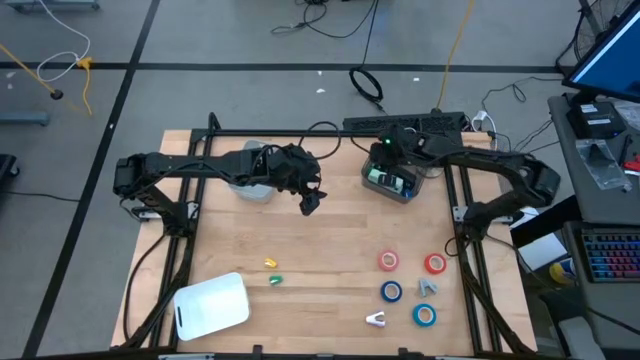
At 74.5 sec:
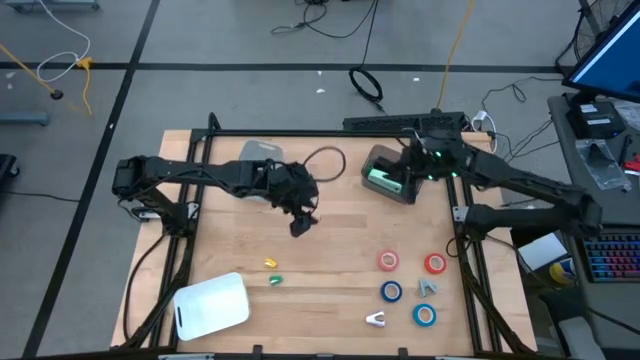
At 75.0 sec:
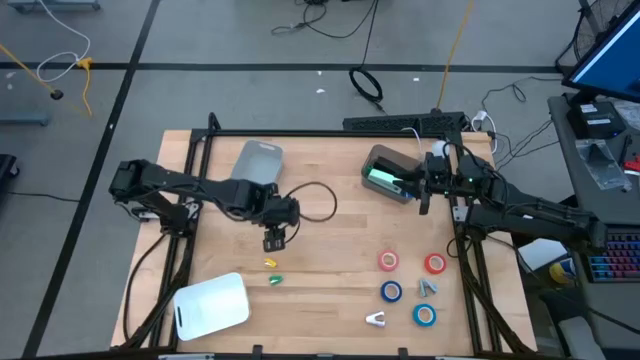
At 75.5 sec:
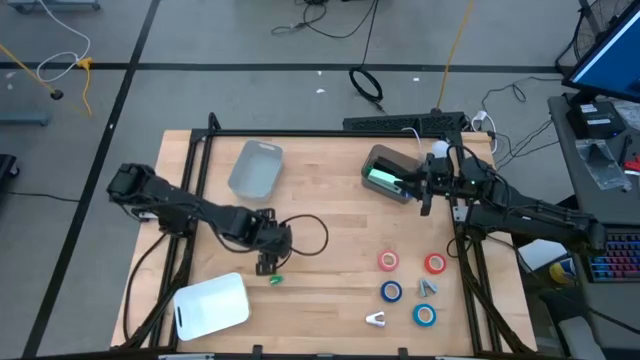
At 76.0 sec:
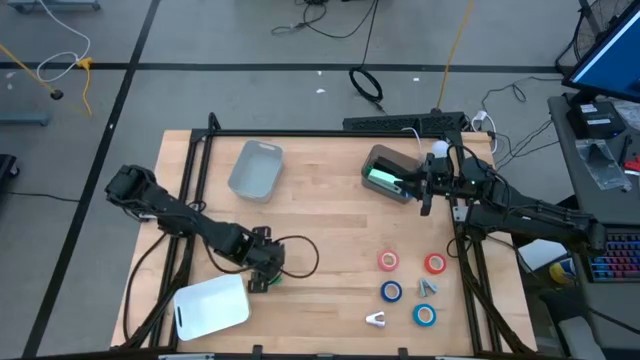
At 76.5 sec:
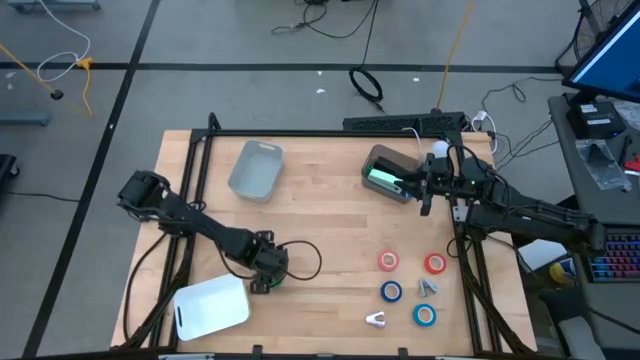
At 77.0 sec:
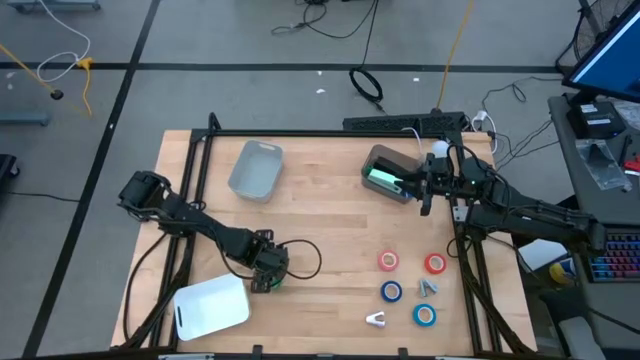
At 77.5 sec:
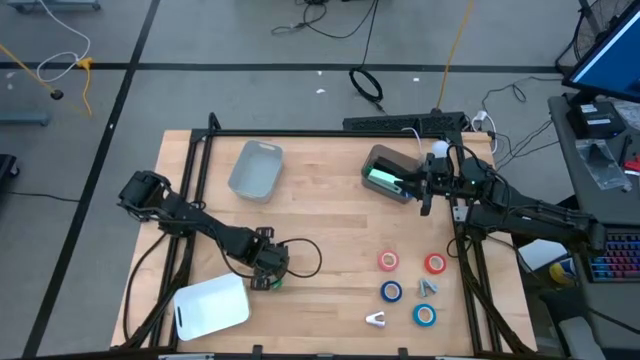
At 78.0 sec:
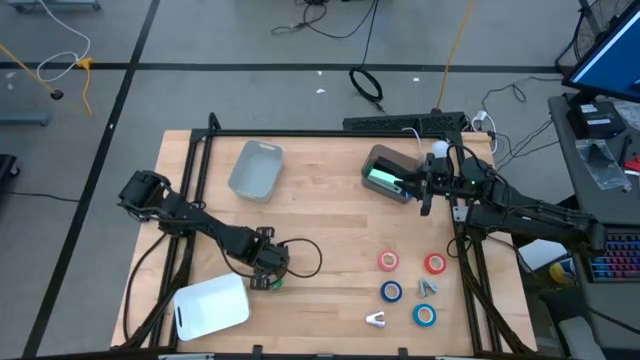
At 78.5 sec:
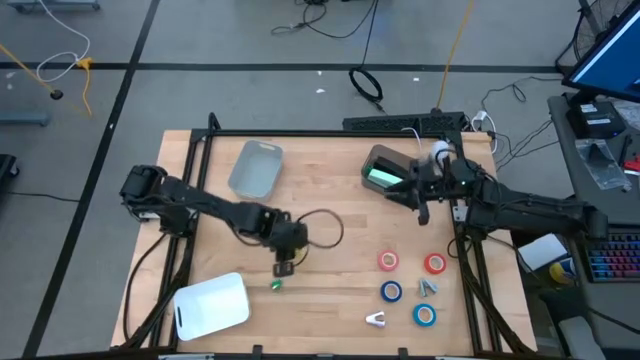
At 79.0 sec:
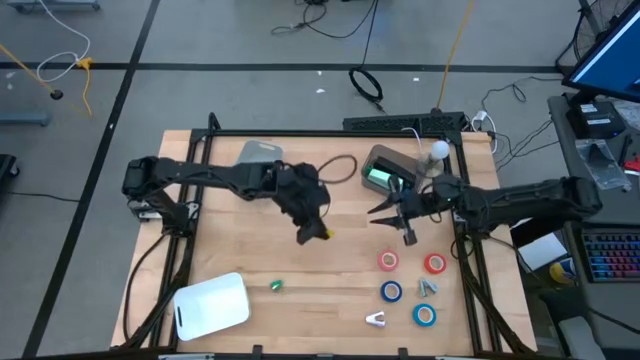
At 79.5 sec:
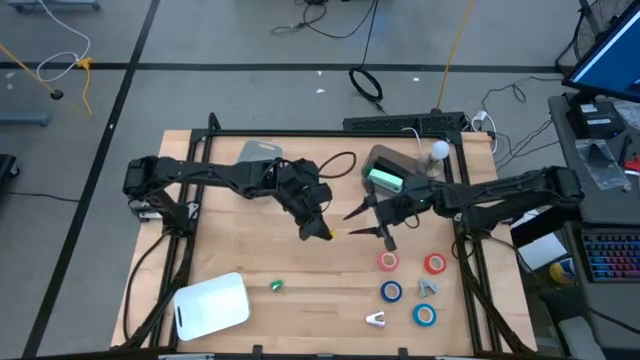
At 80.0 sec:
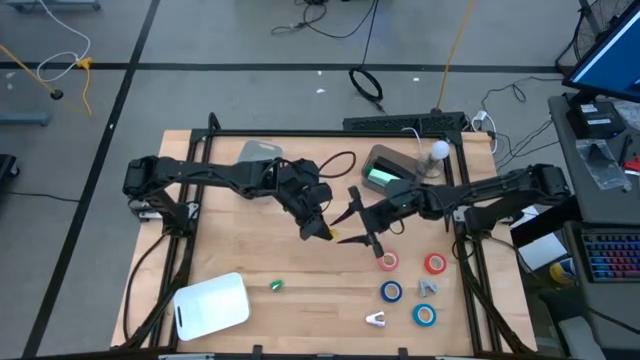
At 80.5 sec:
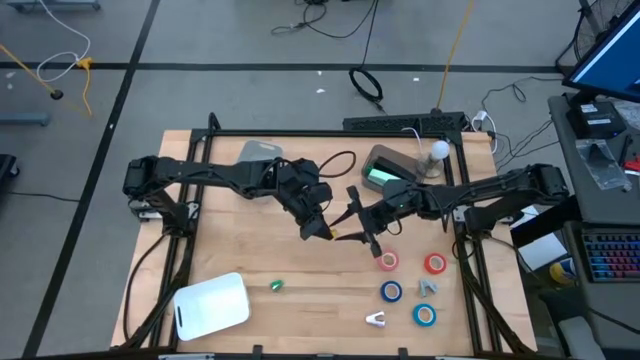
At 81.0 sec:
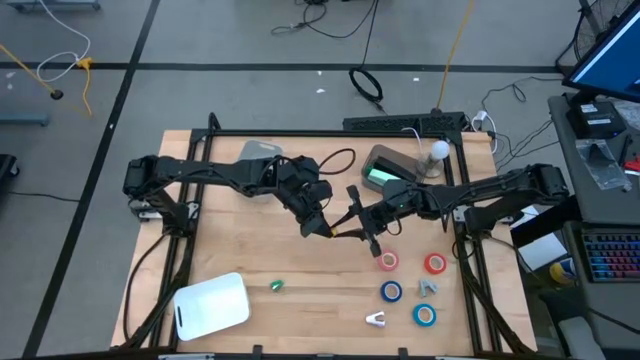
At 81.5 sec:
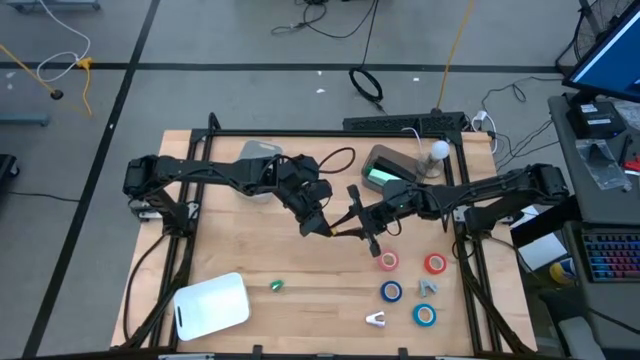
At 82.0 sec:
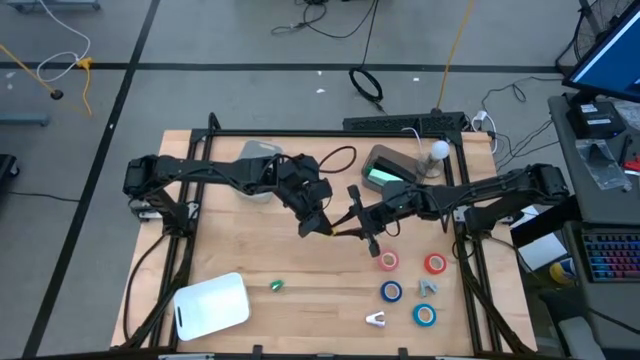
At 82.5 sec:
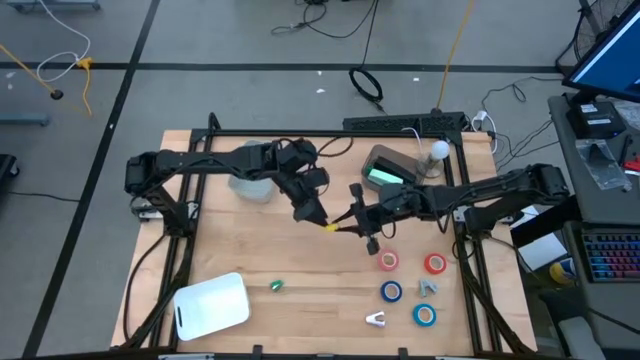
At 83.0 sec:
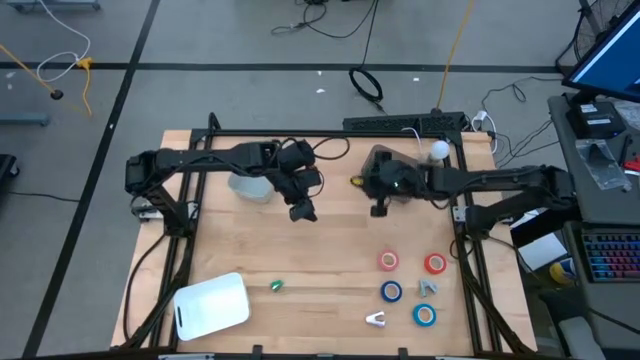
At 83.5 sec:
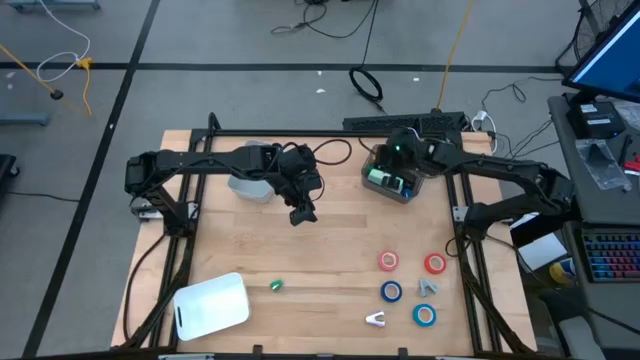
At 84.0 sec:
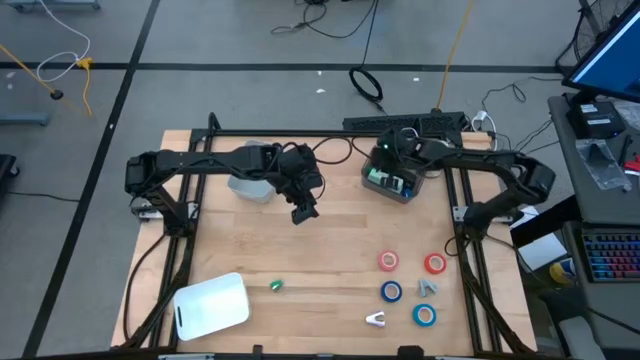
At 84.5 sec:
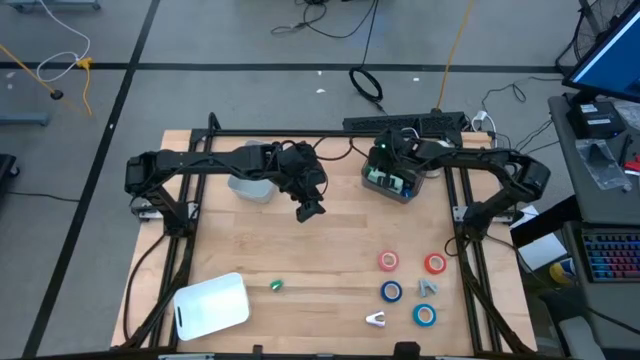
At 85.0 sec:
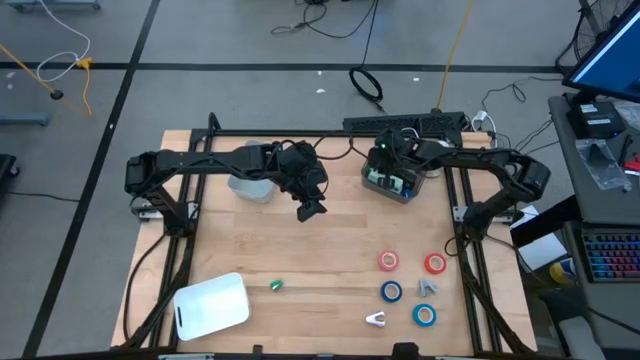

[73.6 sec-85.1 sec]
Task: Pick and place Stapler, Stapler remover, tape
Put the small yellow stapler into the black bin

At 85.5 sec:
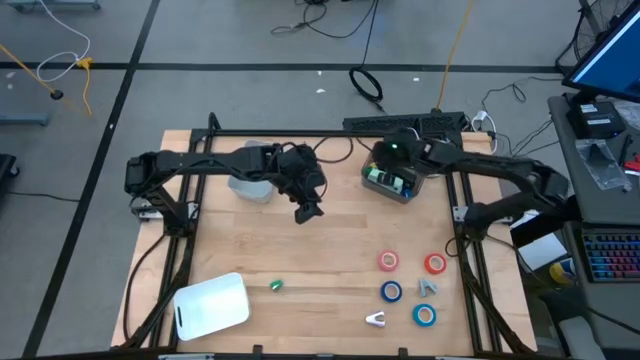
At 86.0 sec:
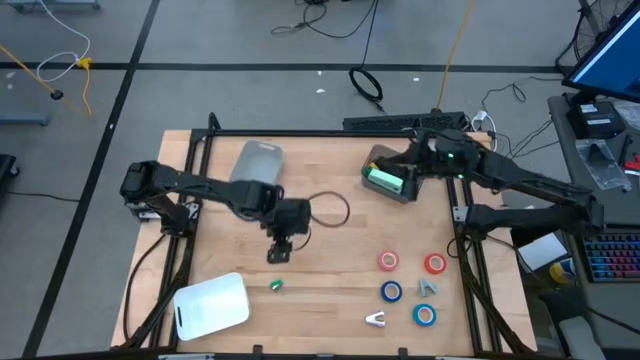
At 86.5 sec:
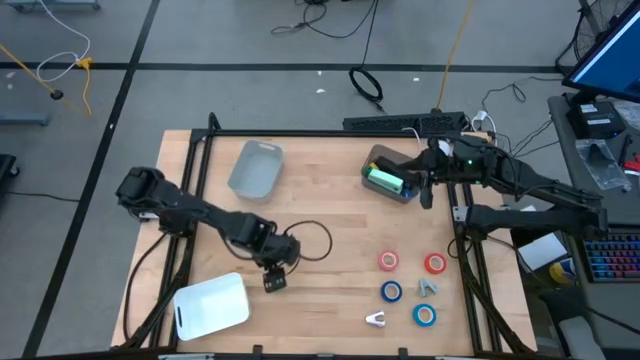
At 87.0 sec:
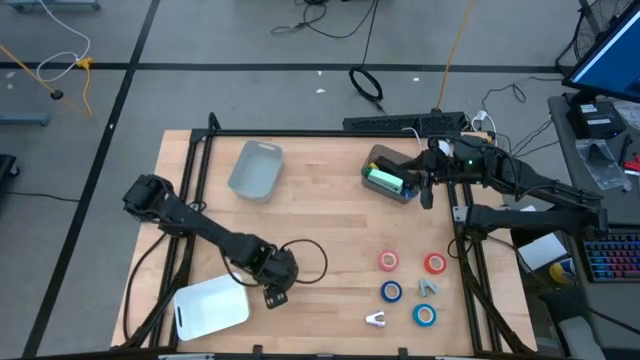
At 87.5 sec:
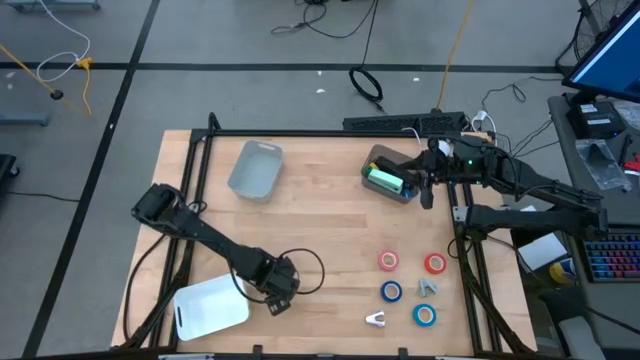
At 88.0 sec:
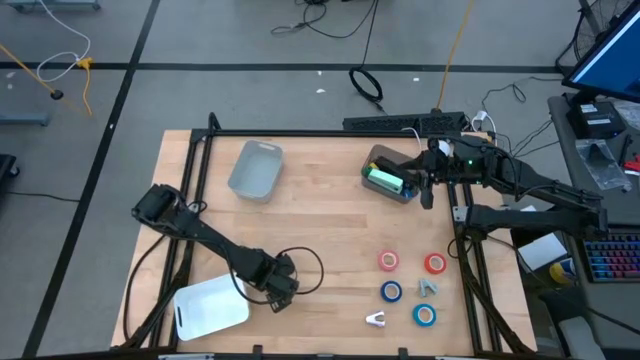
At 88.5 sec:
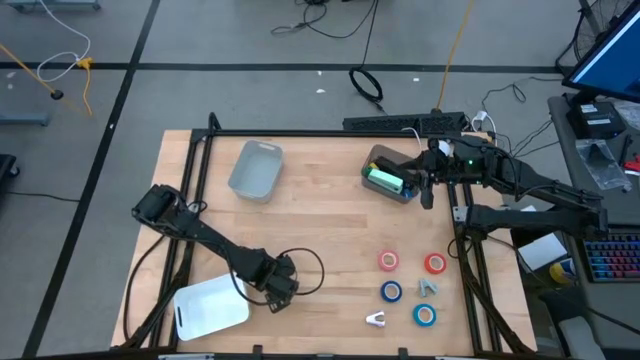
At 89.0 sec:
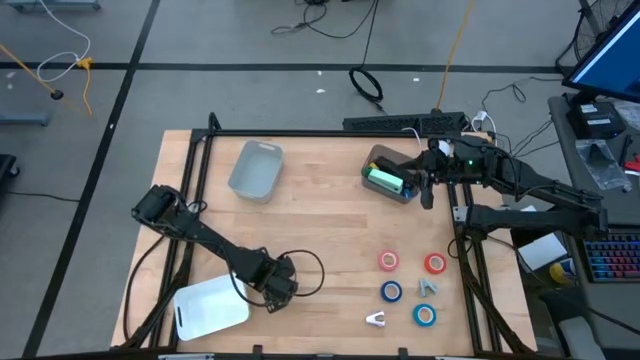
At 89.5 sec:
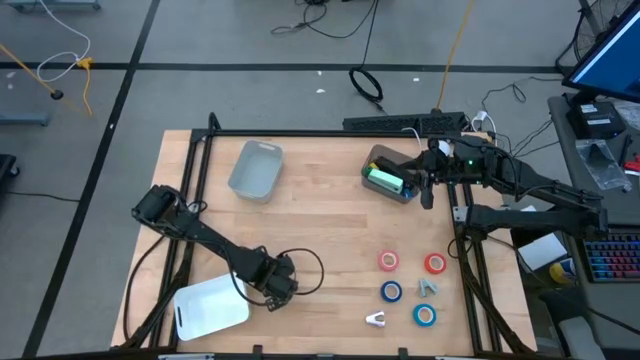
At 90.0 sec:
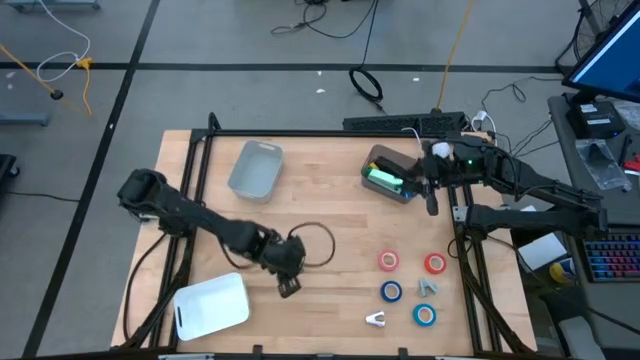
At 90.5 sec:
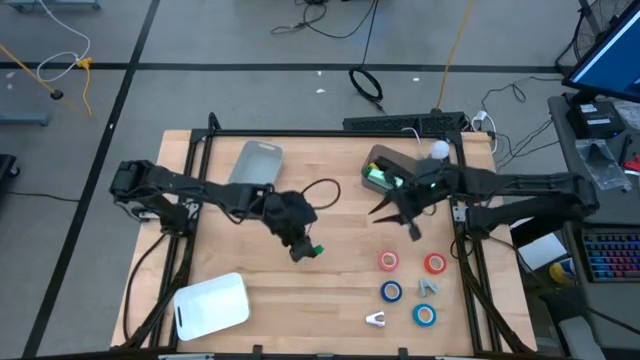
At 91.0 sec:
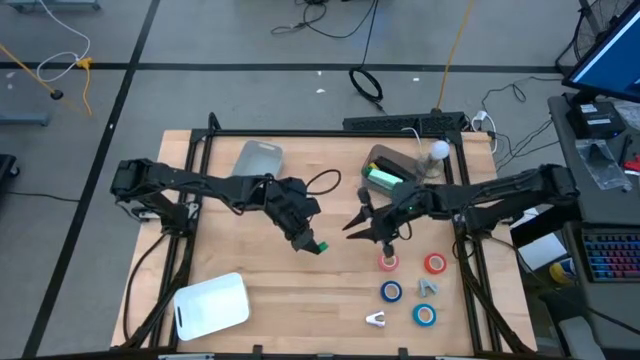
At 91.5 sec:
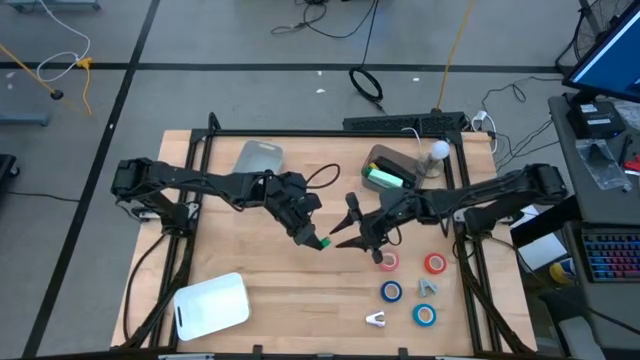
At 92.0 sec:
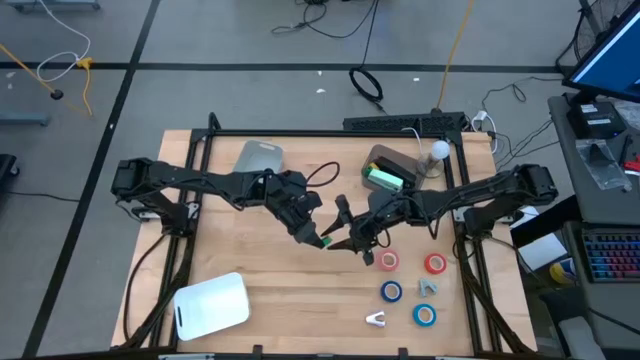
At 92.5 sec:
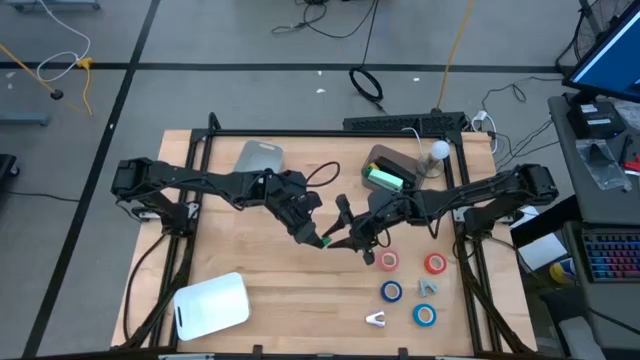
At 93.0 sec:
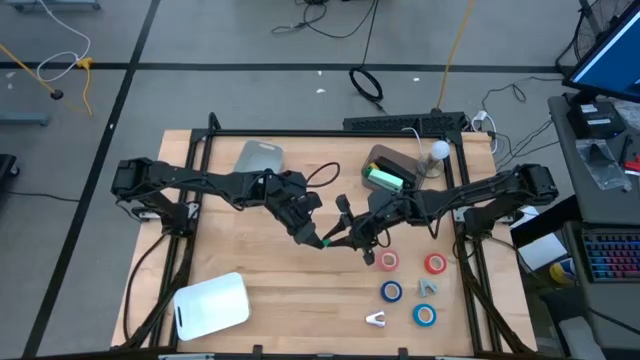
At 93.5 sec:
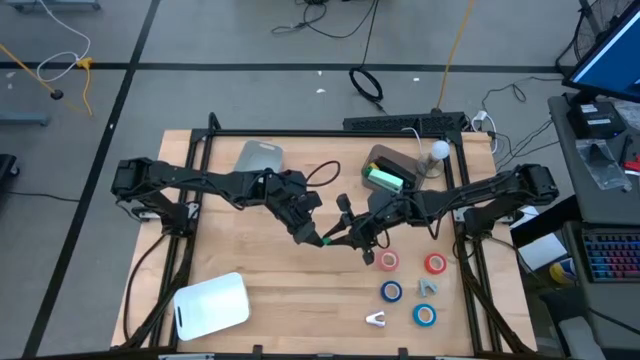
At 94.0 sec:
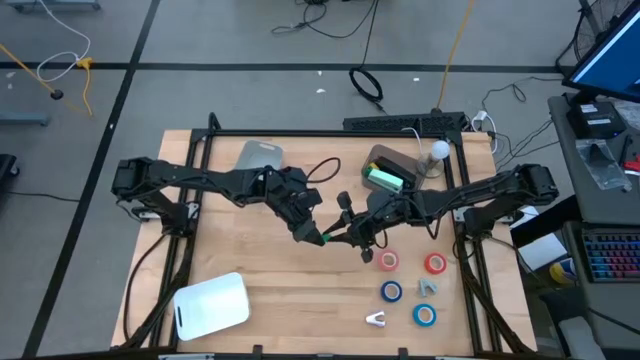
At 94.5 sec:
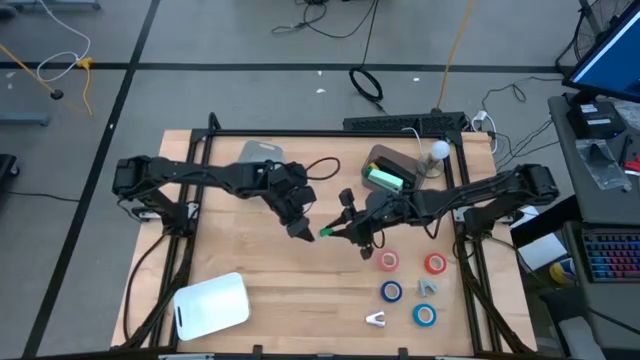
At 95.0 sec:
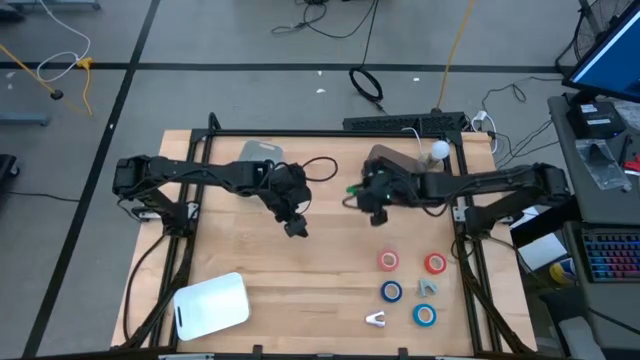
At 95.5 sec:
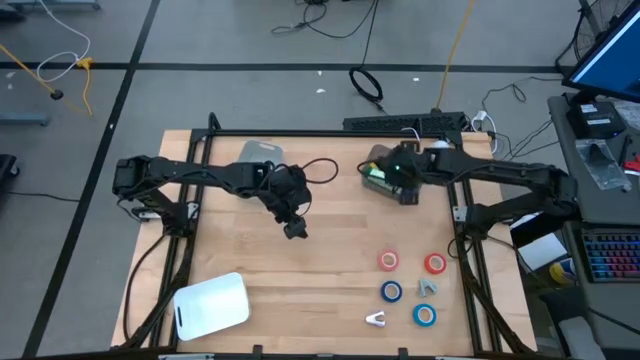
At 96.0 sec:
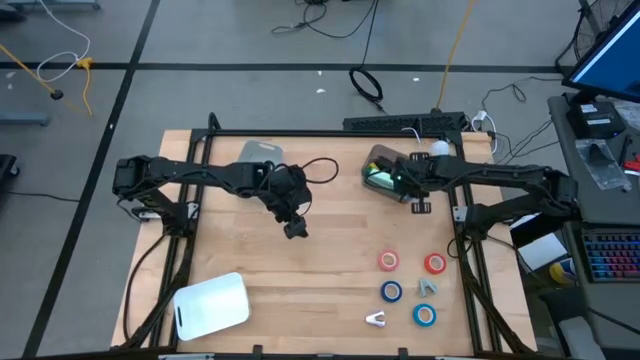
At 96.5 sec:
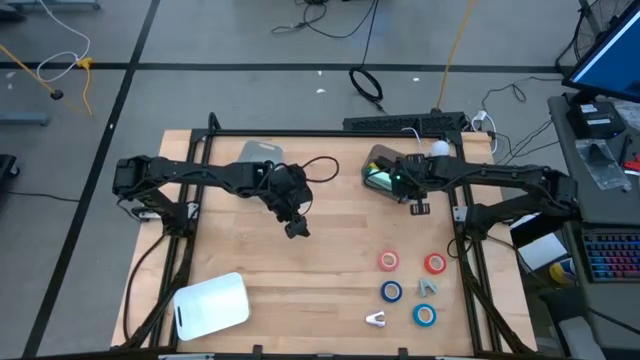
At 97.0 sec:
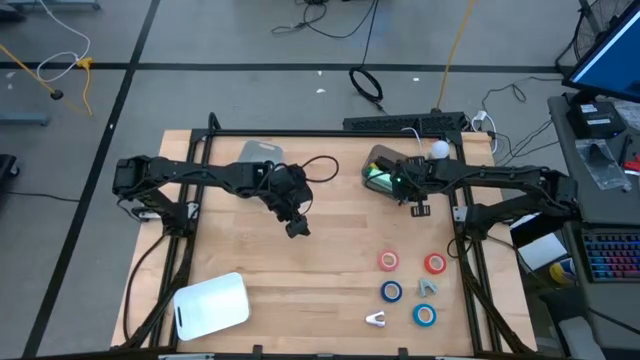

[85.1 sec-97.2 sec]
Put the small green stapler into the black bin
